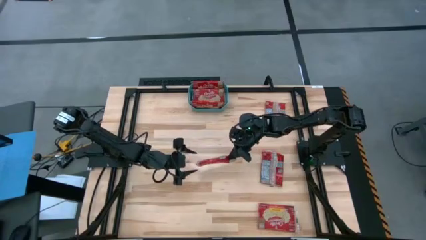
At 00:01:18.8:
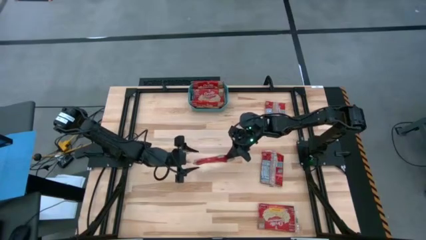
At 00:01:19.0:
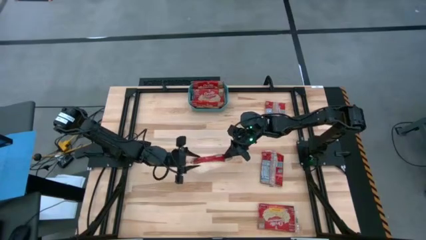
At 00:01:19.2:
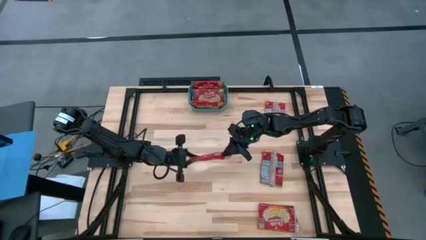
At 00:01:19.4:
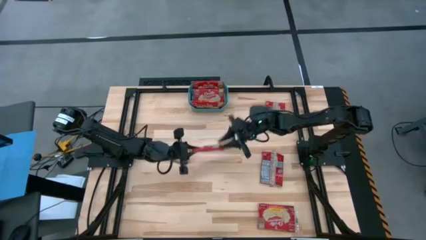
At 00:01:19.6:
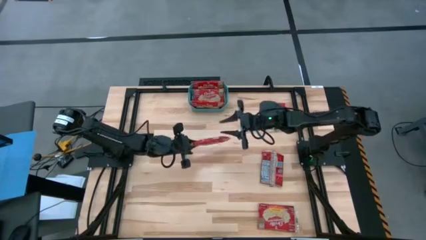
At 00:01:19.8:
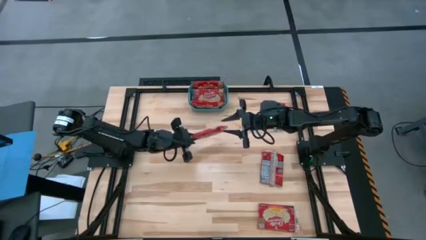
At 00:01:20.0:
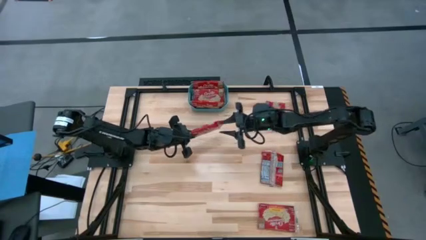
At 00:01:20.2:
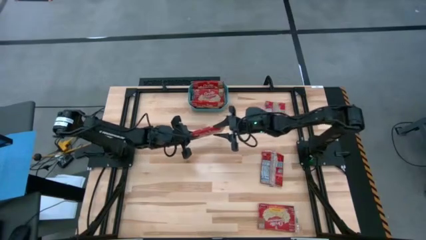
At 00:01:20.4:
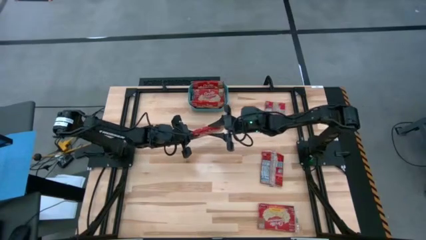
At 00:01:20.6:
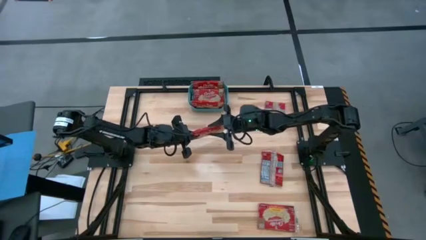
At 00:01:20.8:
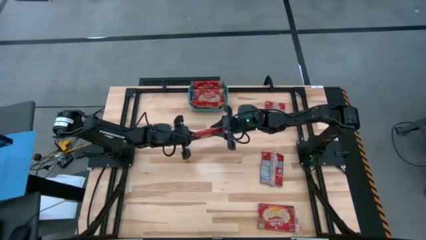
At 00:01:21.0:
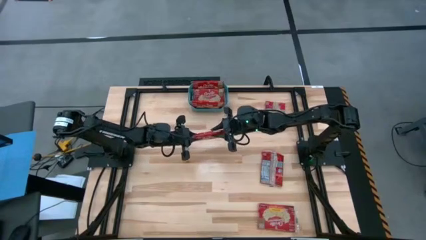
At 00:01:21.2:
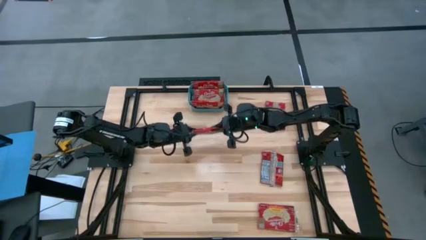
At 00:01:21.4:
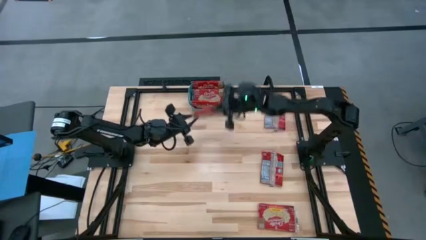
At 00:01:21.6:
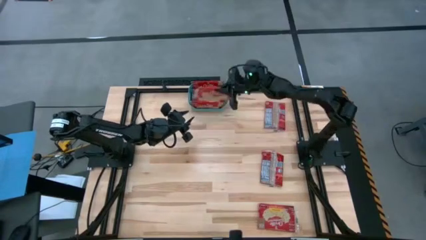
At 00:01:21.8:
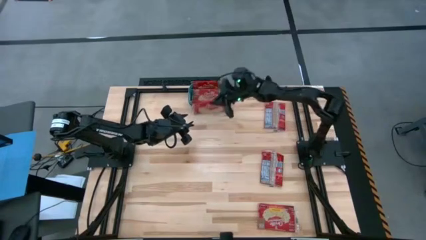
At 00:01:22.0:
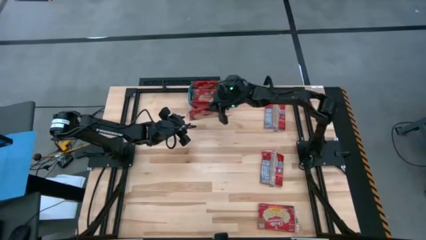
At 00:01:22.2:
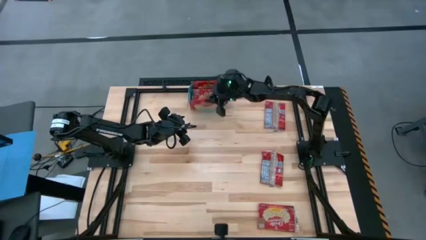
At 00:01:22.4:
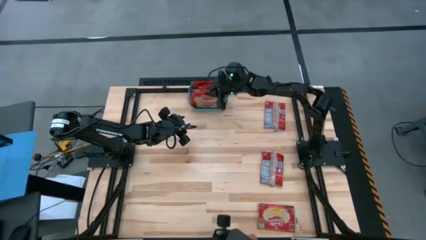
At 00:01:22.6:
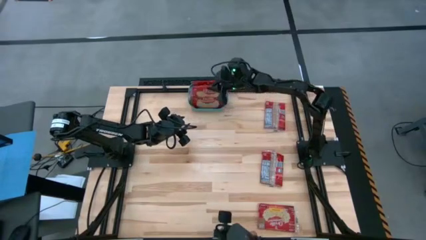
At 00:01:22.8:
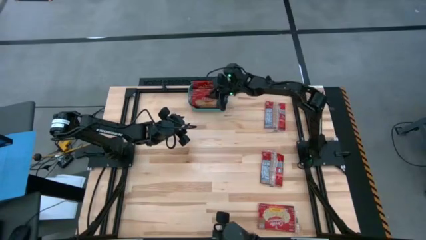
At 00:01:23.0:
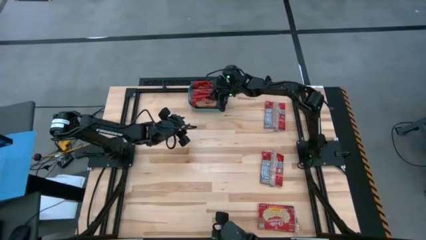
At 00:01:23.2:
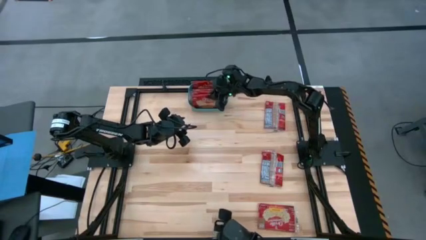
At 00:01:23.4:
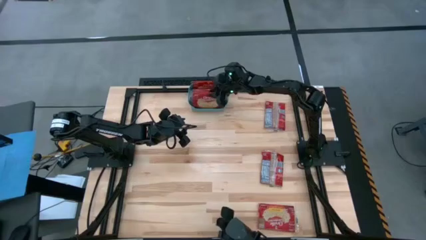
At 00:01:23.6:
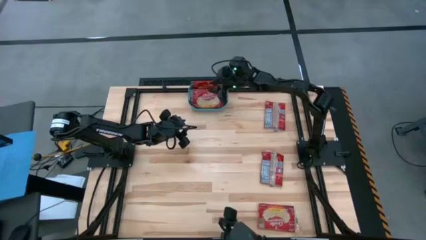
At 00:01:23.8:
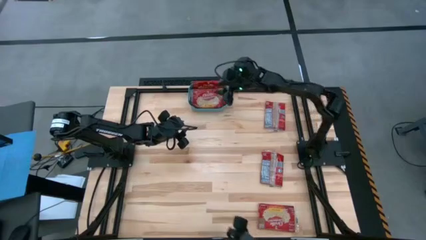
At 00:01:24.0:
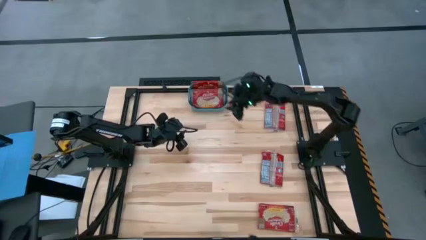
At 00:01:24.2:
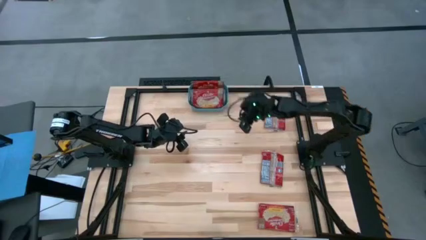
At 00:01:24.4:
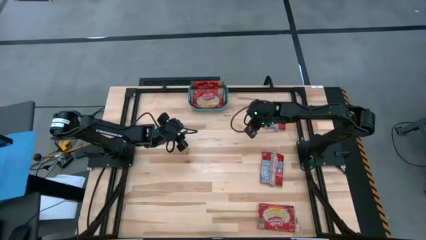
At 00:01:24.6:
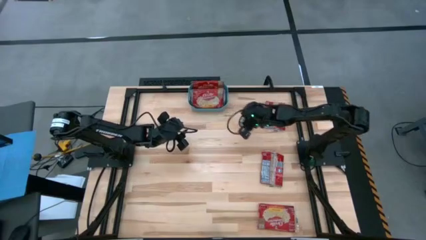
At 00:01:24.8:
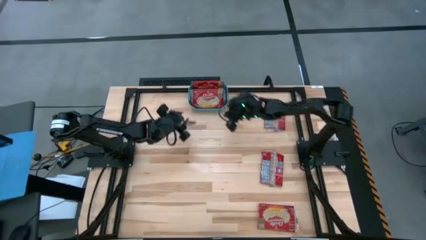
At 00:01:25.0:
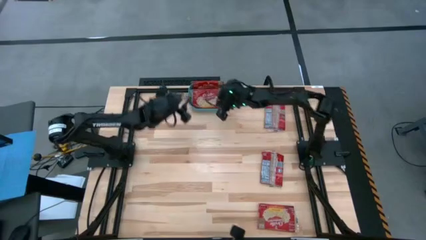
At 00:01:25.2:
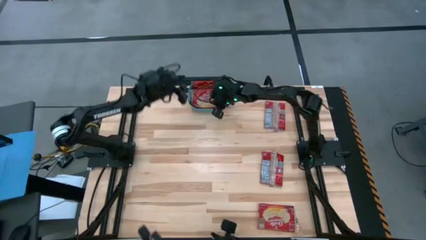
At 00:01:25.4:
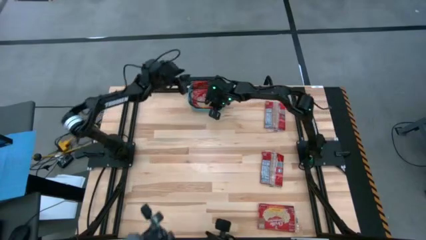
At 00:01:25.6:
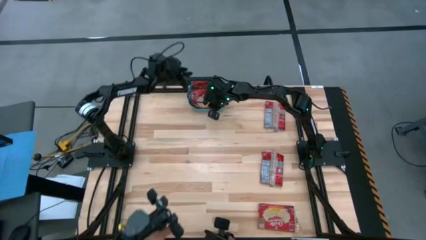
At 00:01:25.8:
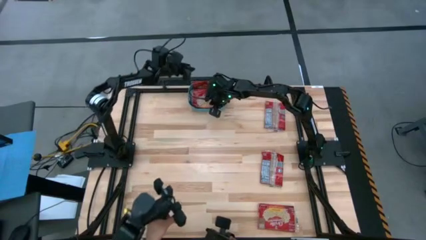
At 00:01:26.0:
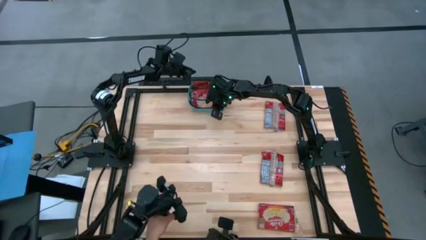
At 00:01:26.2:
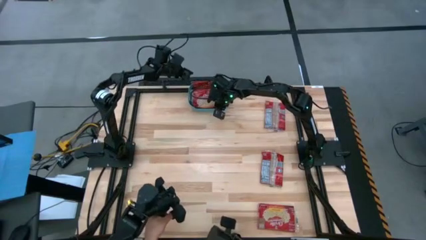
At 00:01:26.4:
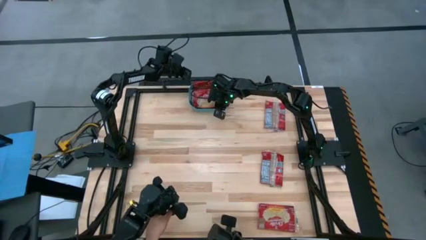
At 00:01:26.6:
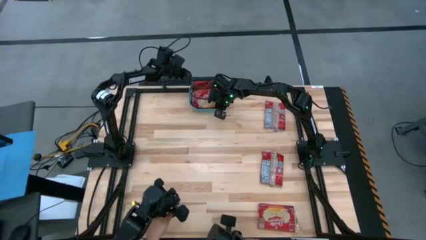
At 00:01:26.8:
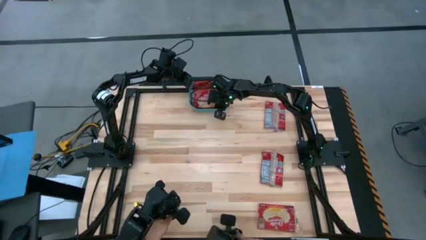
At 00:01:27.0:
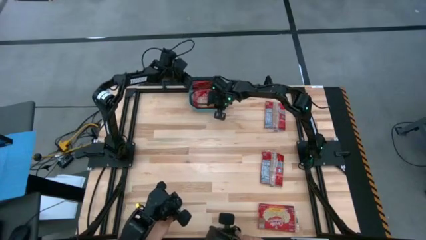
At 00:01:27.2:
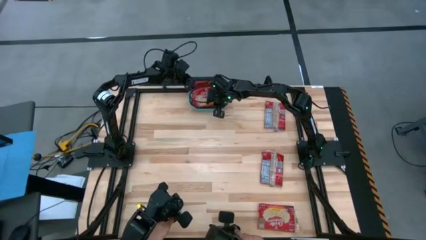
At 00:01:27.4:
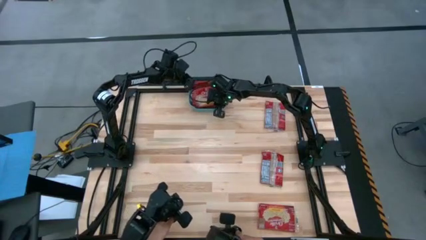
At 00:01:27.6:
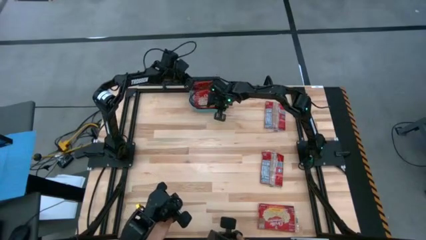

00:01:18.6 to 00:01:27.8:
Task: Sort popcorn bags into baskets
Put the red popcorn bag into the green basket

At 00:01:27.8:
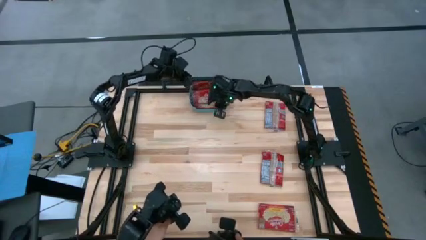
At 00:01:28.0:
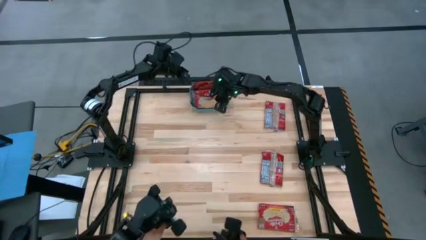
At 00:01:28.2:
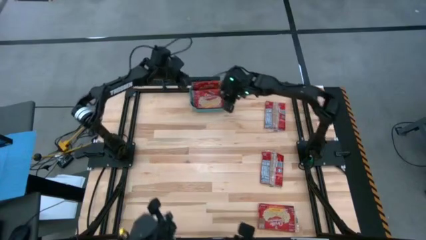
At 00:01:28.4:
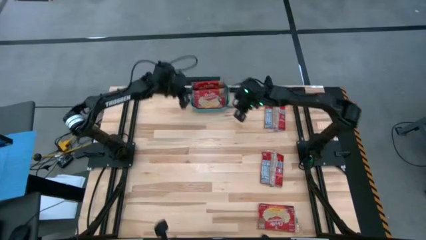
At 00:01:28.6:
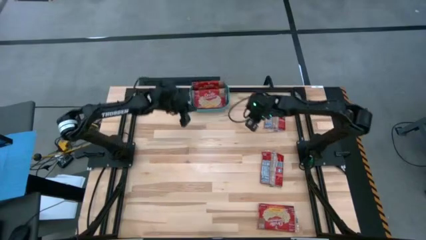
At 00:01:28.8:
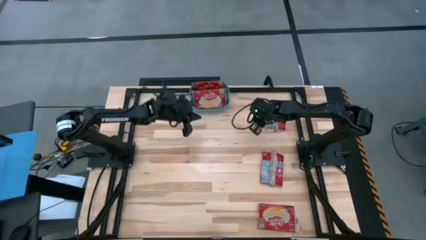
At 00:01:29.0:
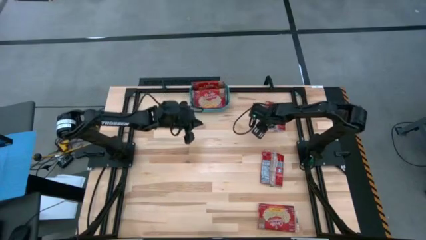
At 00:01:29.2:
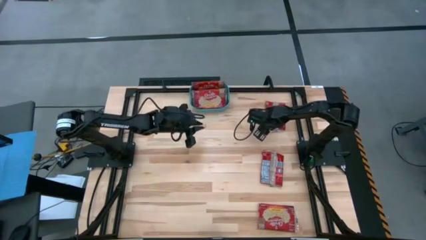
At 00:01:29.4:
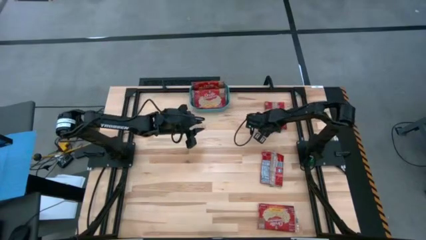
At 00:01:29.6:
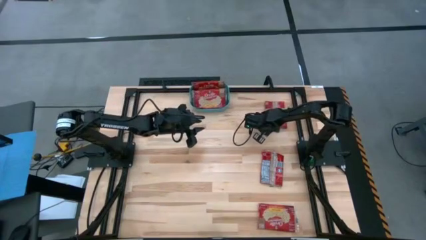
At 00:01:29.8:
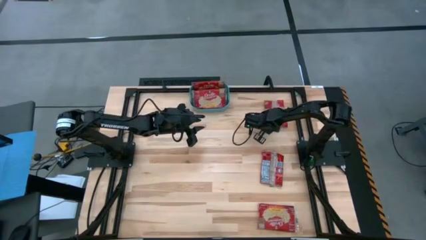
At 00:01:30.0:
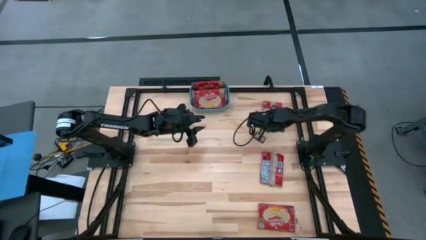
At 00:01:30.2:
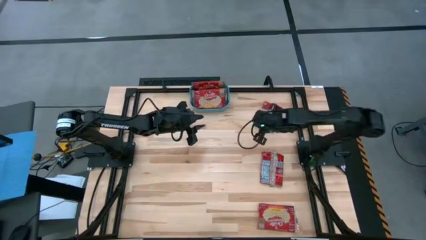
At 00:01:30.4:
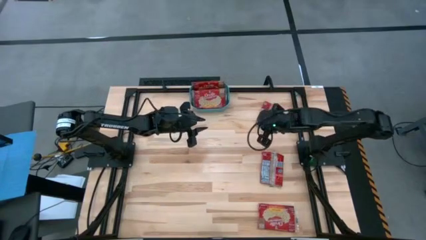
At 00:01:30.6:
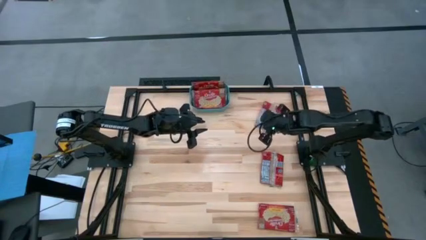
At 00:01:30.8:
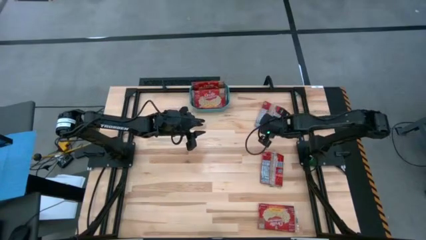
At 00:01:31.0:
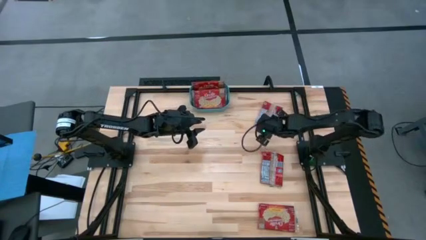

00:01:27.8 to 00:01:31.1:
Put the red popcorn bag into the green basket
